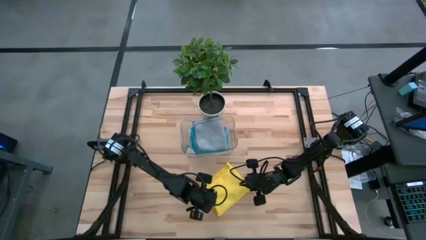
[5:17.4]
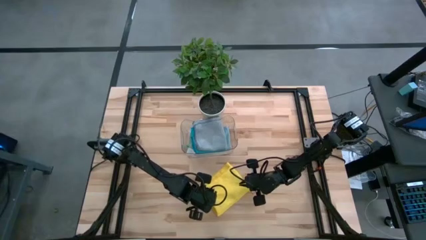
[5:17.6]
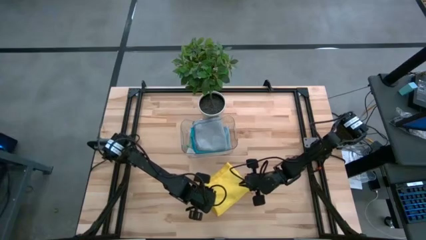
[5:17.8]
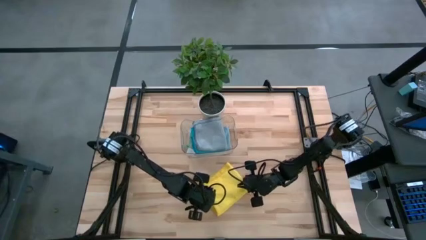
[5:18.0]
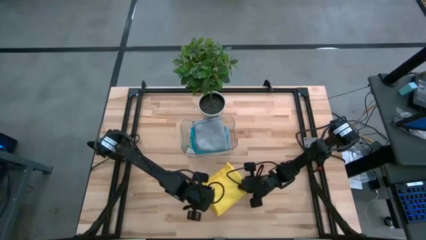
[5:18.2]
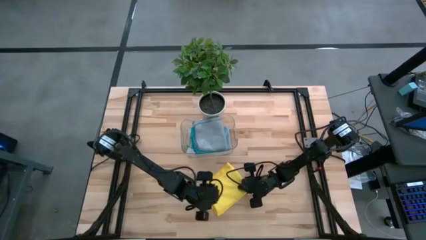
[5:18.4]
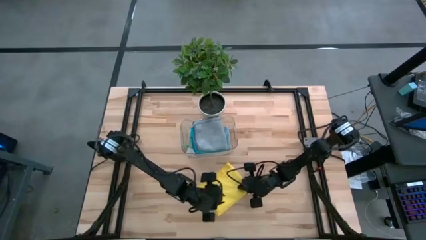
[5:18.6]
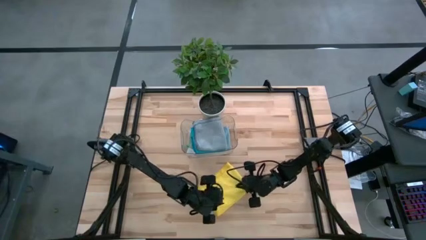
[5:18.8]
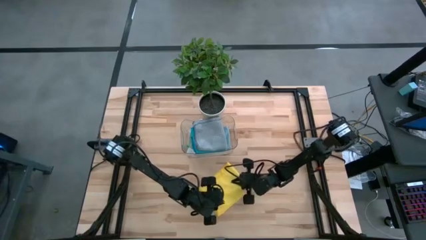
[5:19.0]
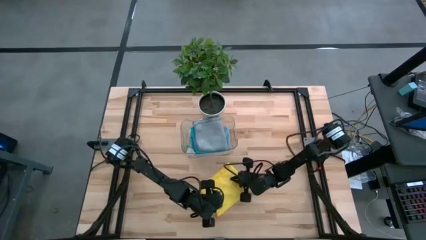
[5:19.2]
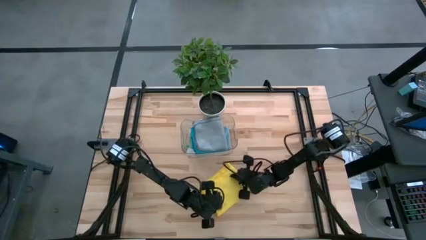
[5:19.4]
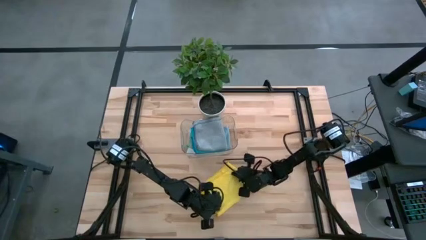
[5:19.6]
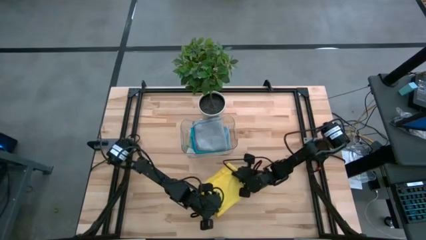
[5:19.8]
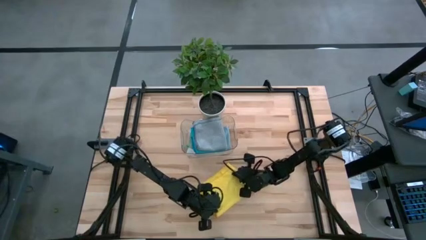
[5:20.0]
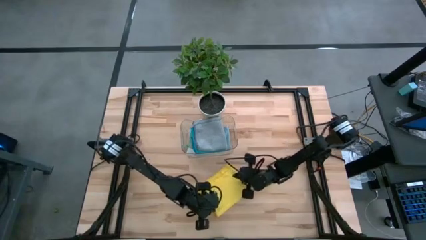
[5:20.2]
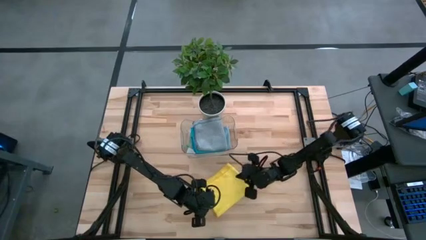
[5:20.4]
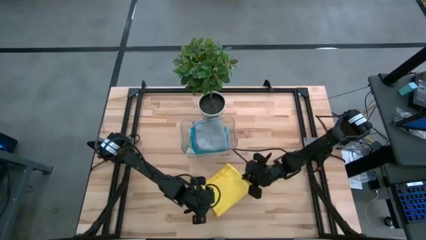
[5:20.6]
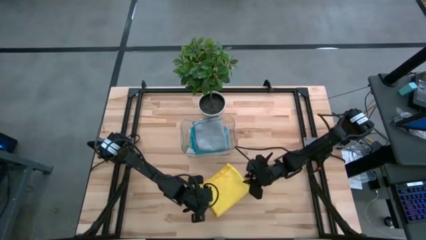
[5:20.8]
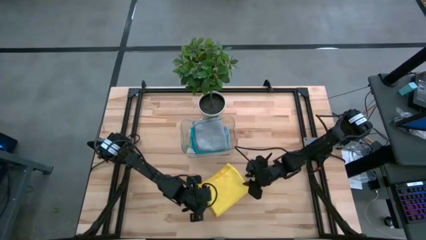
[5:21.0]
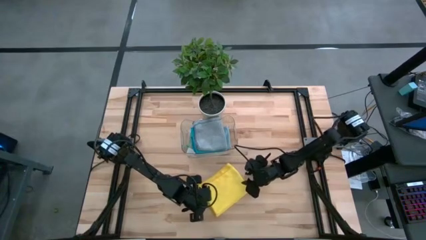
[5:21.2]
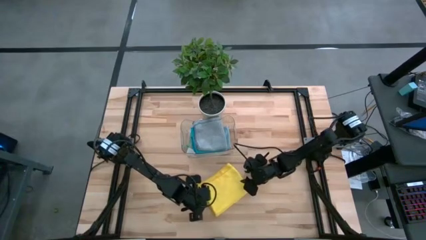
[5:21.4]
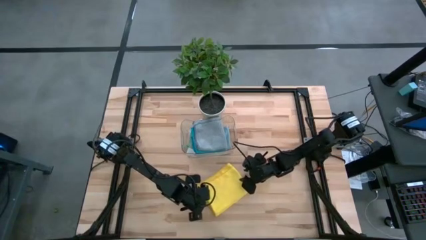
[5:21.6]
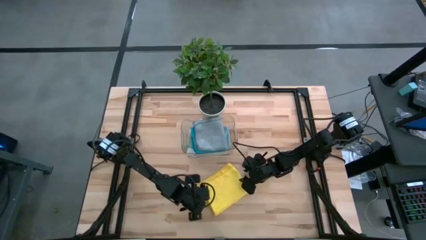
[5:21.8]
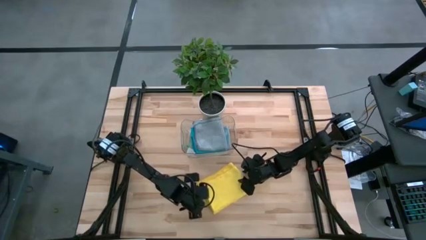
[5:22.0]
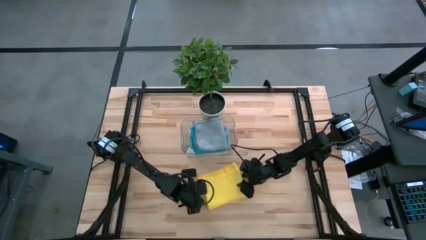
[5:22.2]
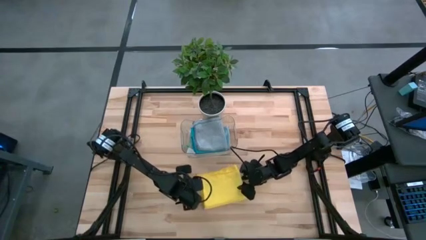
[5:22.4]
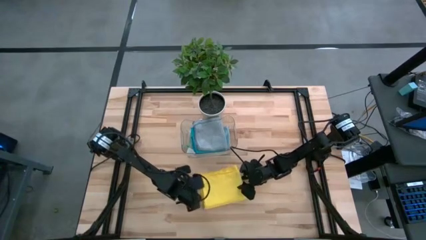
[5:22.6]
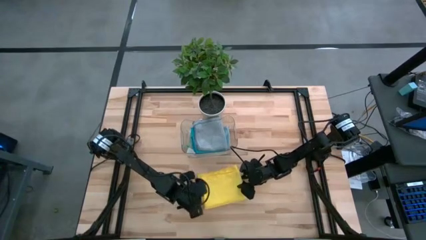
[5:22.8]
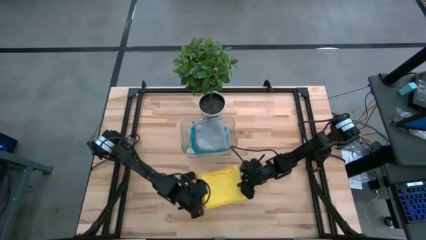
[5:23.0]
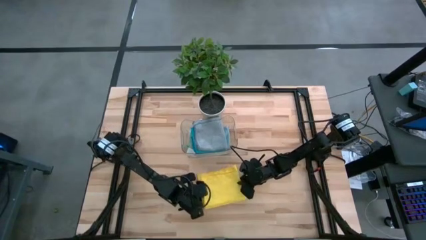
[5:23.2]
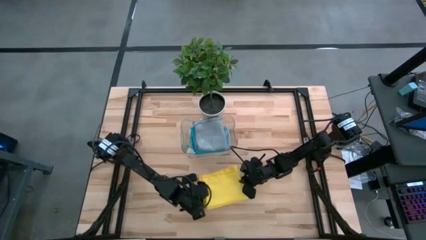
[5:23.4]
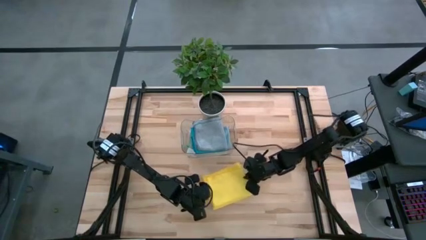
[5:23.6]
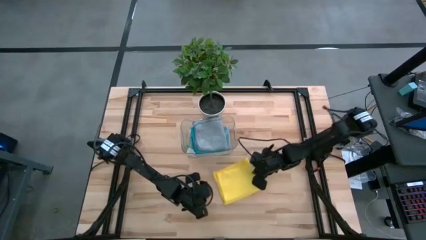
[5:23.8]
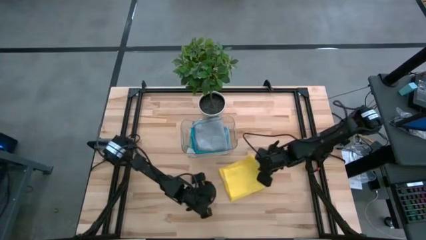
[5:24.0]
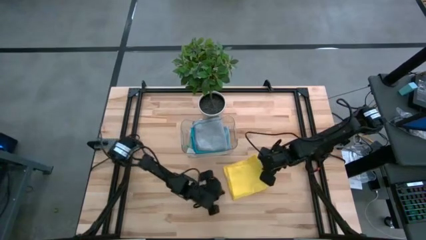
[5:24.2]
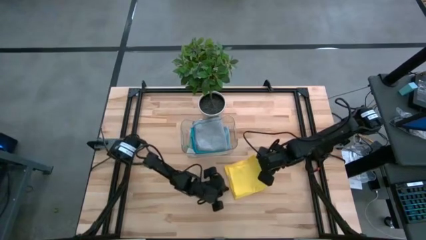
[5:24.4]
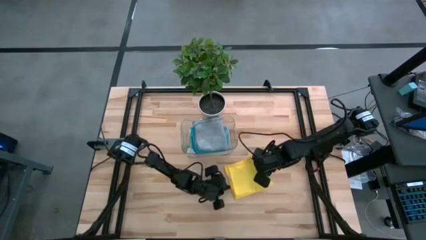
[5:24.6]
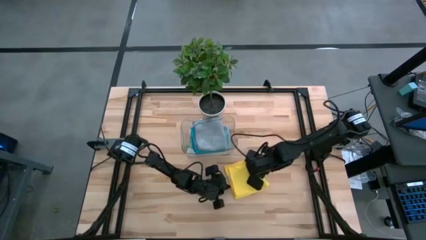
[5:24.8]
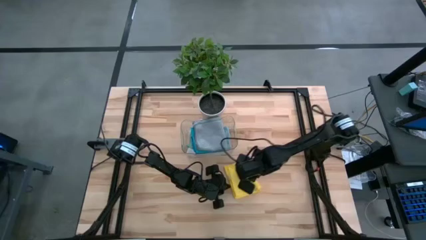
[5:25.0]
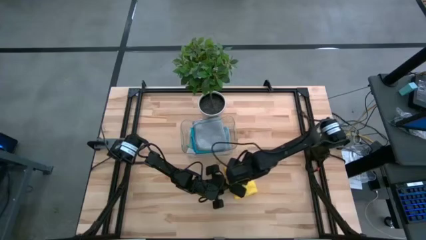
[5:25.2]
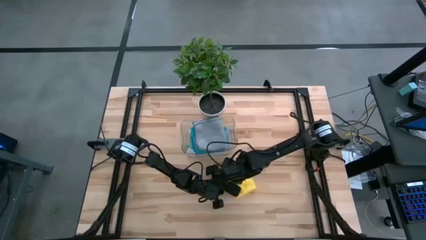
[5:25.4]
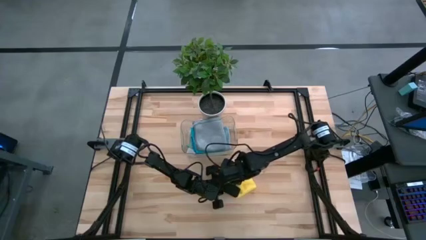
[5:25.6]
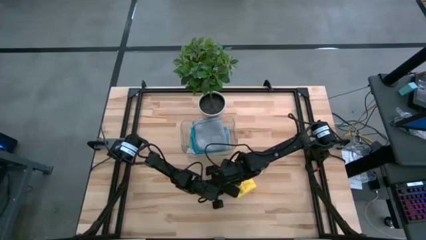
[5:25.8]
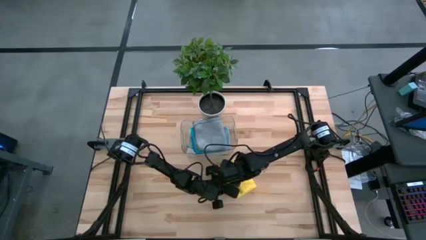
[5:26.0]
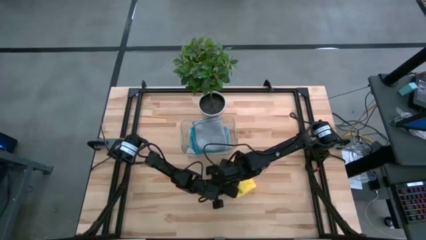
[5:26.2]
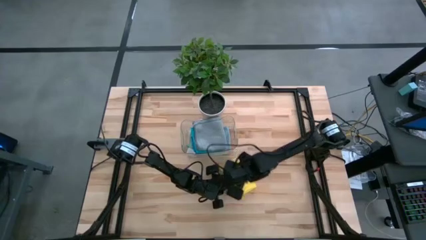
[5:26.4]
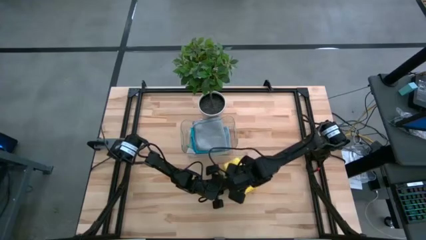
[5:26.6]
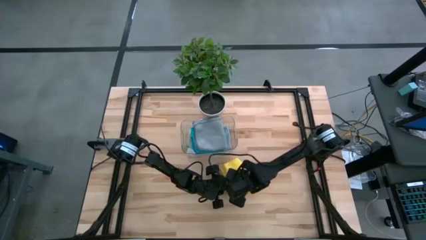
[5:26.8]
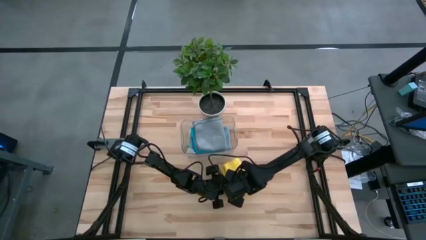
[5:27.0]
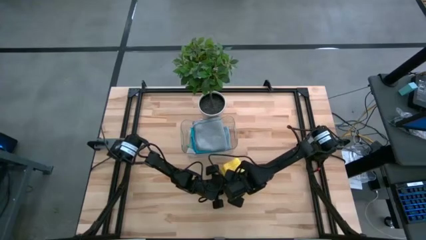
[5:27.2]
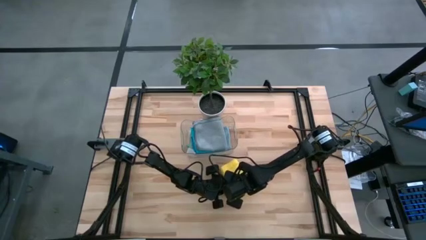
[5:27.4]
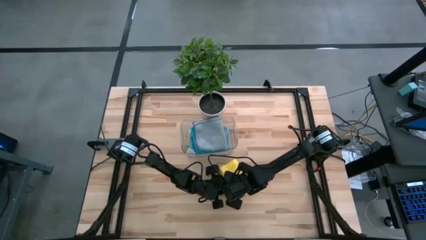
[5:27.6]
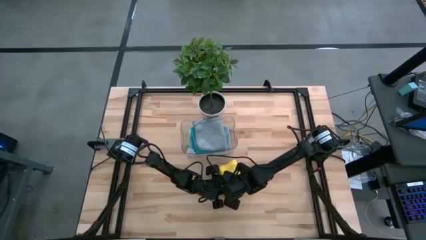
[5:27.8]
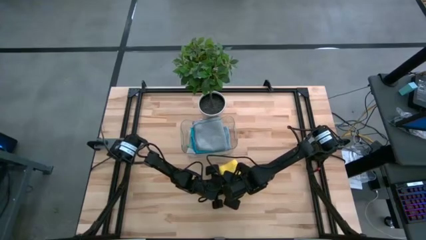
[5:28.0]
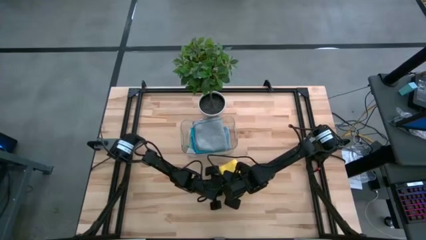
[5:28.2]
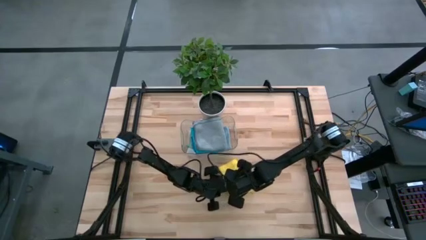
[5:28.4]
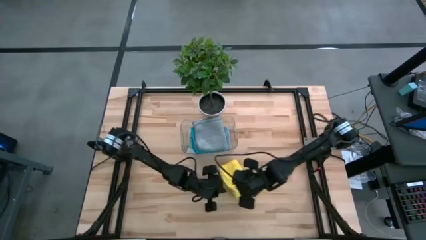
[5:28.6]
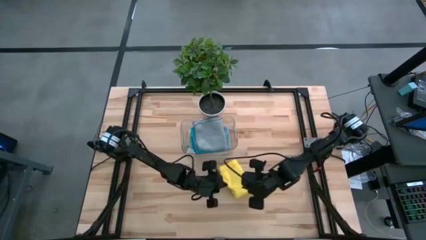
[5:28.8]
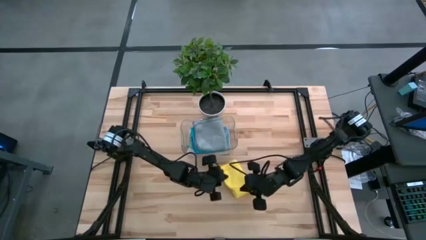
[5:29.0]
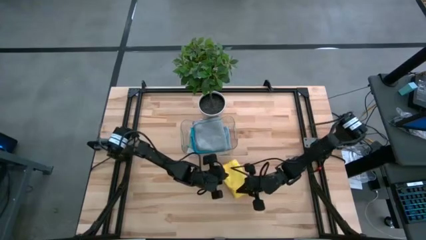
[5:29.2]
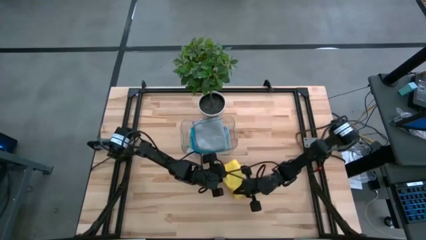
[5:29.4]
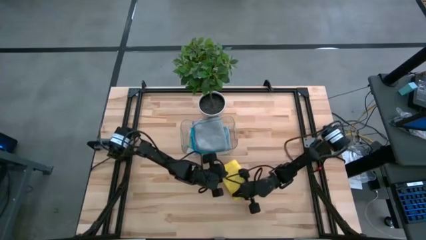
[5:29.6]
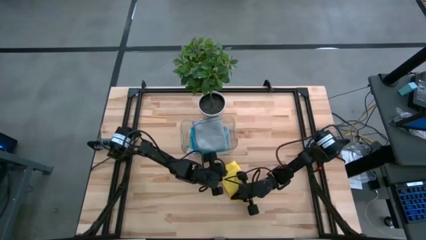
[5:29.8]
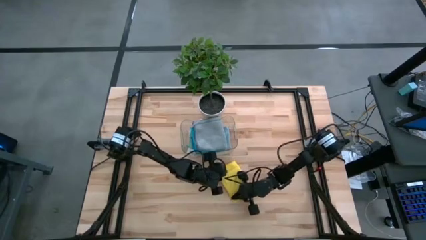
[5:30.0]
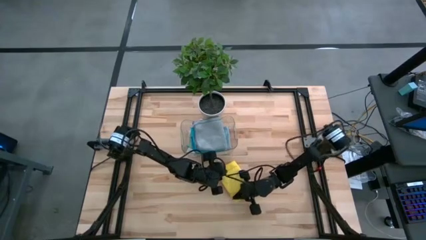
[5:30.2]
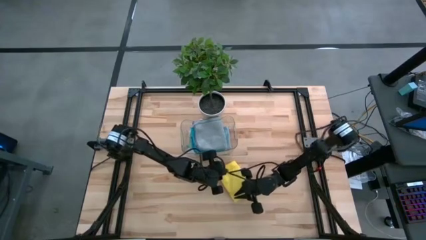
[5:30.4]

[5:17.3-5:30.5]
Task: Fold microfiber towels
Fold the yellow microfiber cloth
